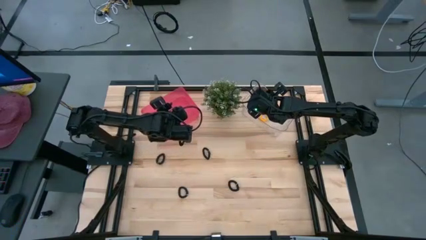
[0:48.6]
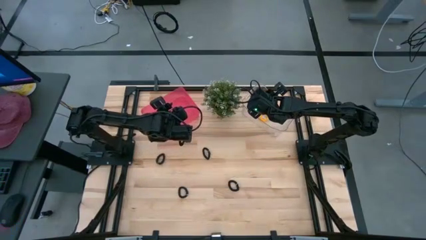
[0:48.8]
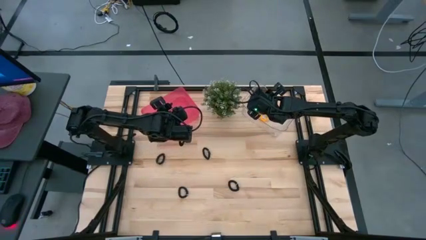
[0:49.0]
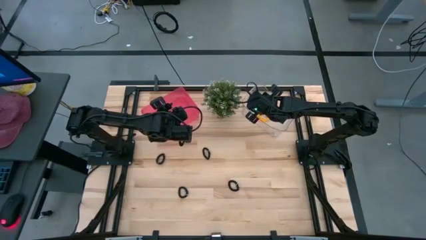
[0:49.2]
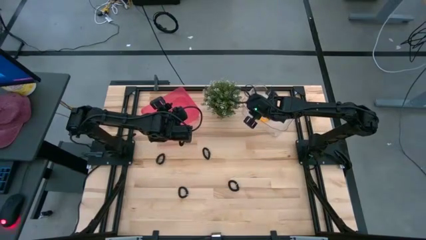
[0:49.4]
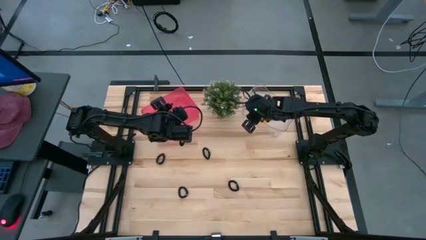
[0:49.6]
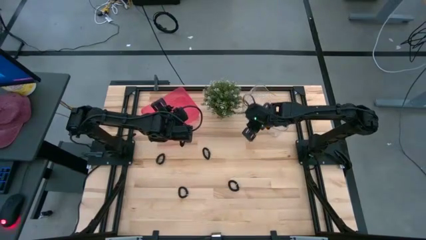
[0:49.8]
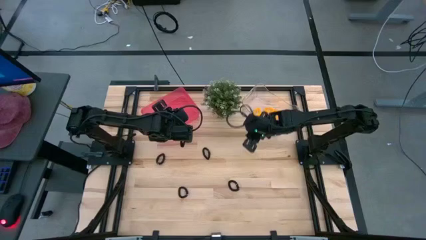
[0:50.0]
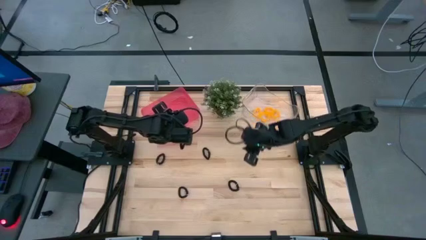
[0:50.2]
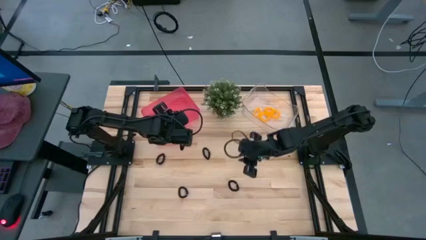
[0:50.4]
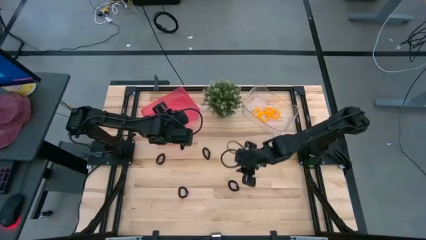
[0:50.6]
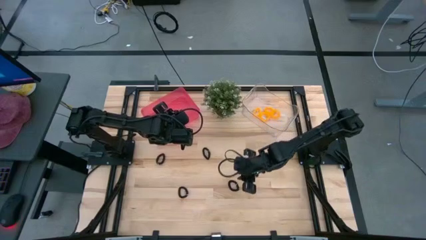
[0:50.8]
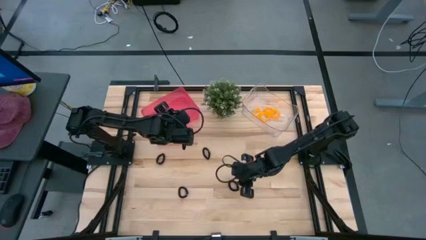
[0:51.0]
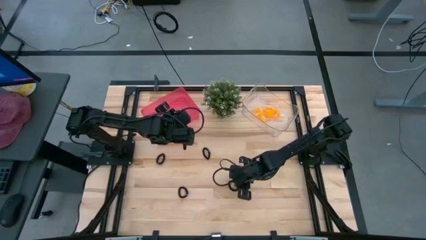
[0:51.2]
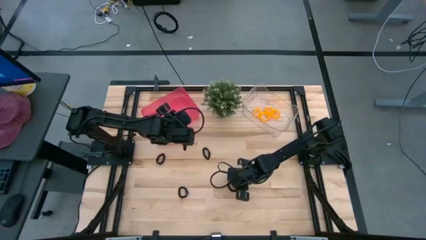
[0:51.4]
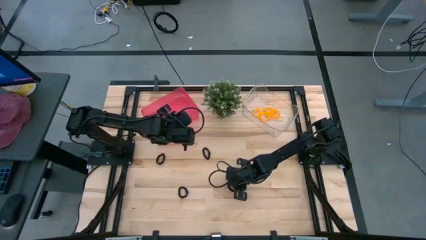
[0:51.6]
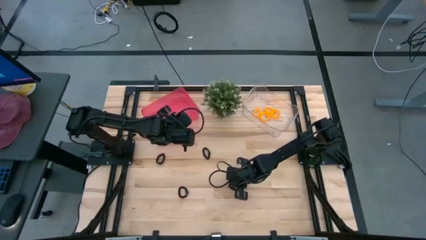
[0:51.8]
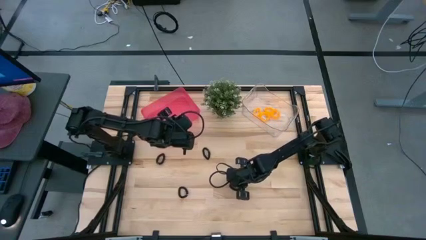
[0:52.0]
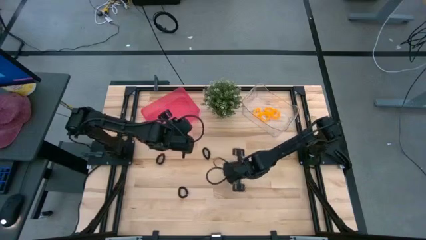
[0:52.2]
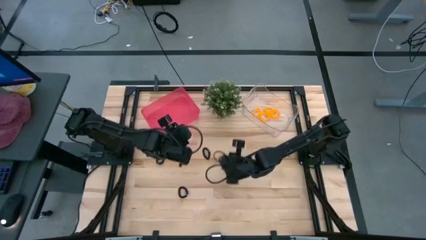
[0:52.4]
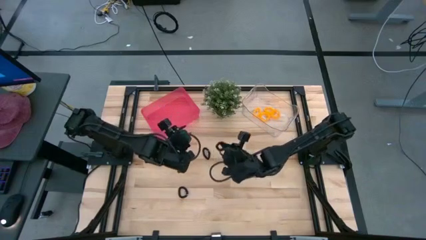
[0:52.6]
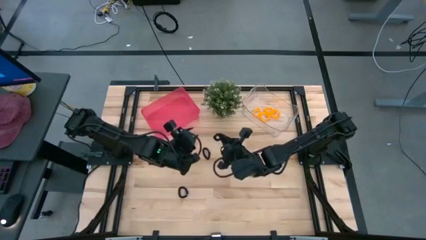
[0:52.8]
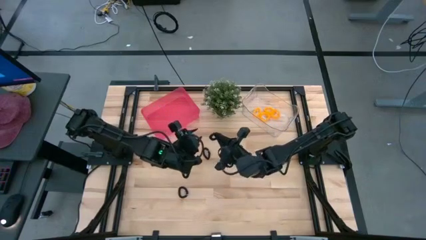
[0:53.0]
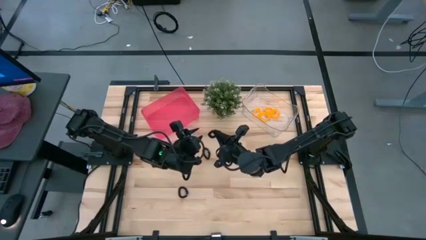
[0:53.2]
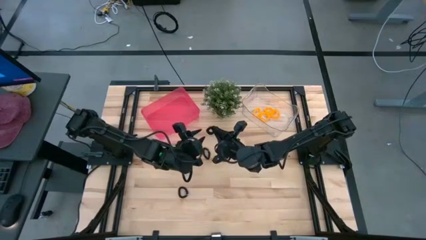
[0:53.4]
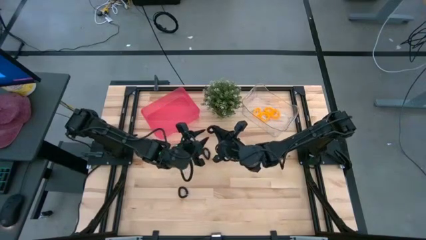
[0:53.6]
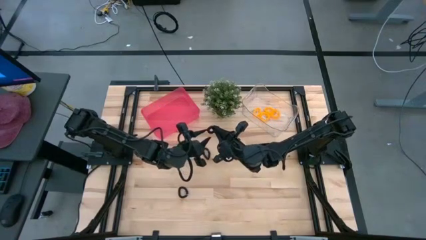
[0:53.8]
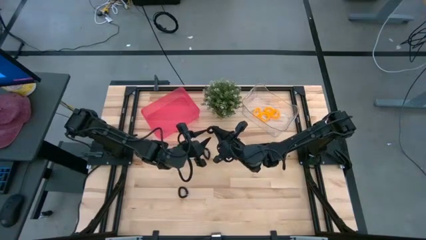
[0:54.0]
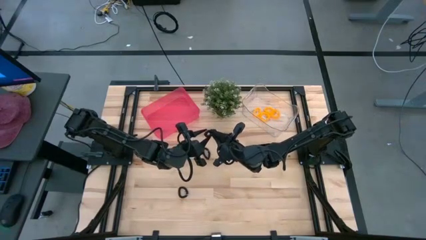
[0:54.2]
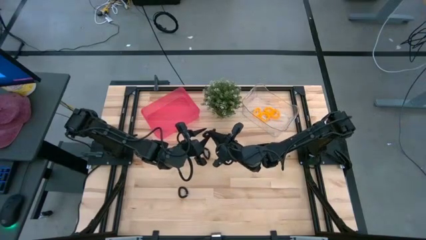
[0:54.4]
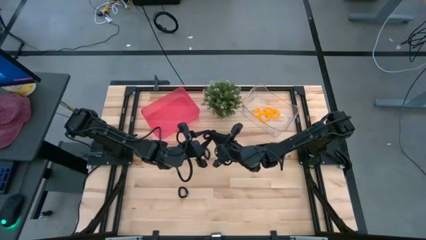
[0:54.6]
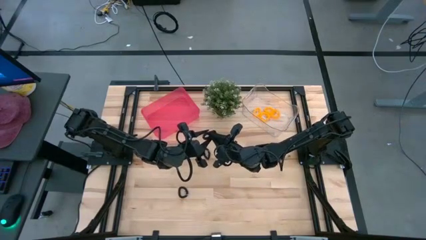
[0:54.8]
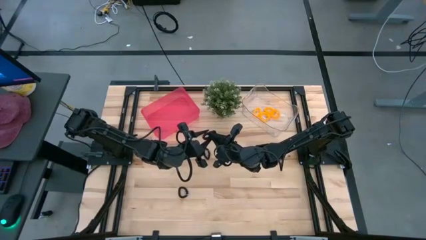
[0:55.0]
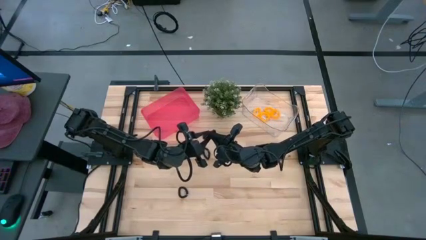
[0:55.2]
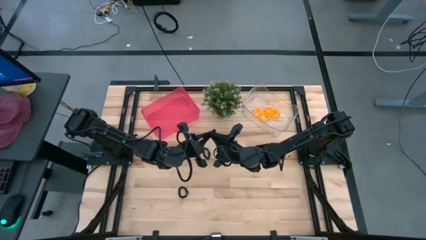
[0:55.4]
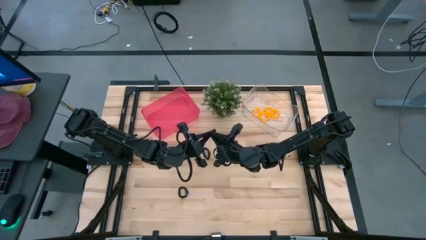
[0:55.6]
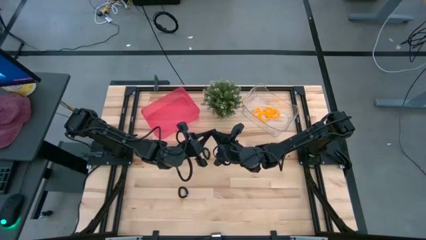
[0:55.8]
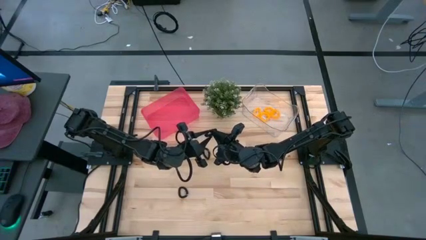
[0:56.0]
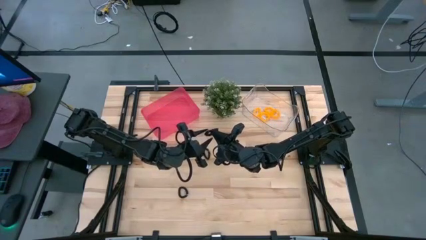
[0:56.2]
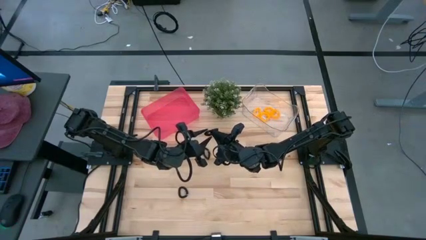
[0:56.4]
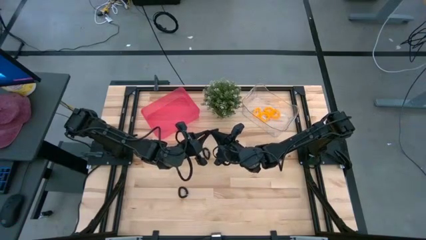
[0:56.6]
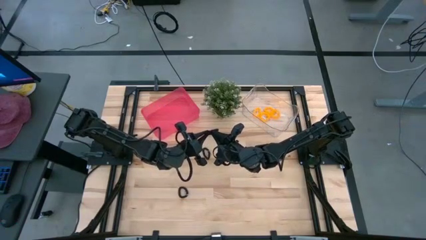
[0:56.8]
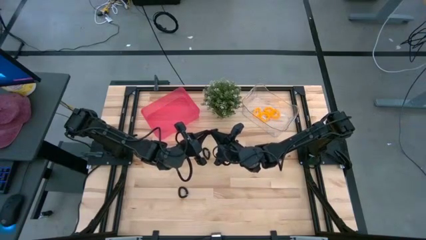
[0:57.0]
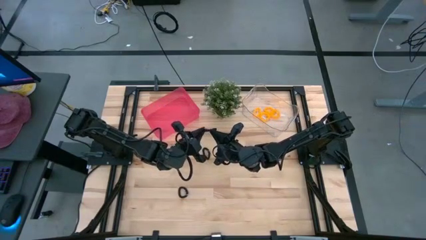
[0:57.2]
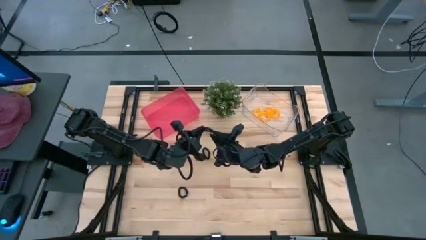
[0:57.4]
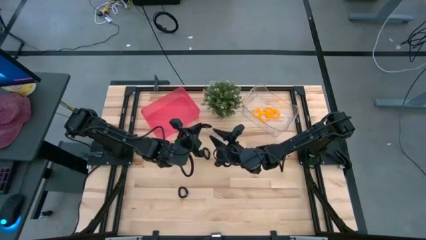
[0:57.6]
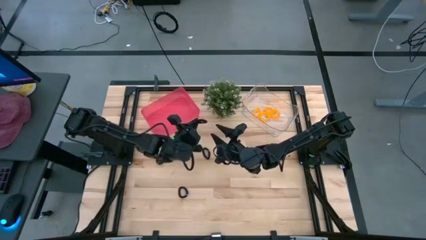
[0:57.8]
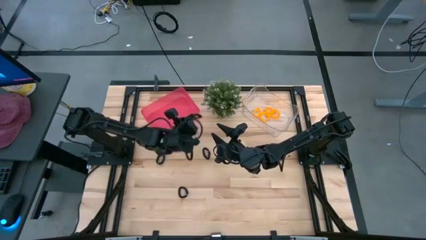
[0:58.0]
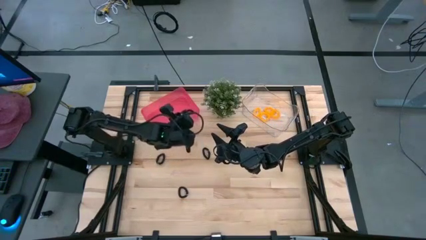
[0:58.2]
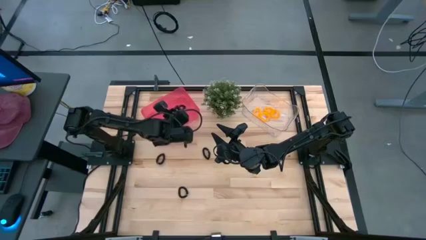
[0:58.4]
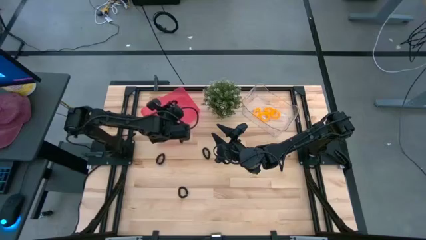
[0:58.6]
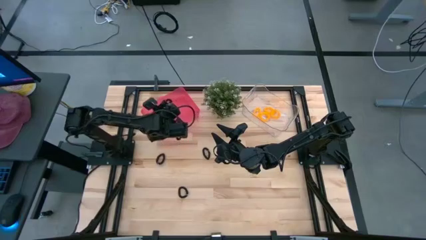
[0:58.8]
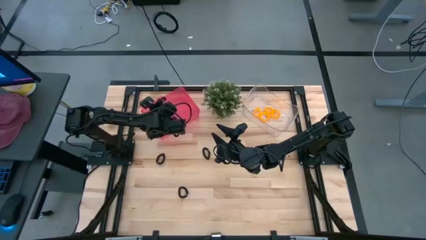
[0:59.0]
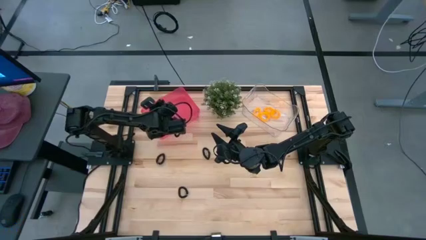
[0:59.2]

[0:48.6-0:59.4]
Task: Sort spring keychains
Put the black spring keychain into the pink bin

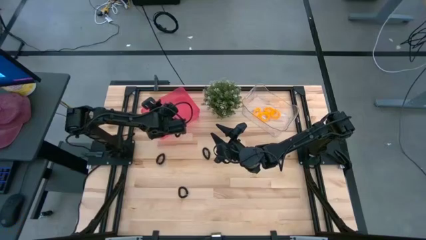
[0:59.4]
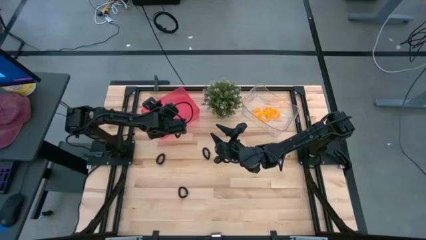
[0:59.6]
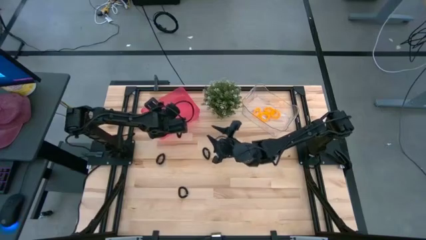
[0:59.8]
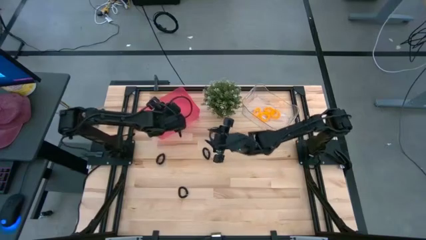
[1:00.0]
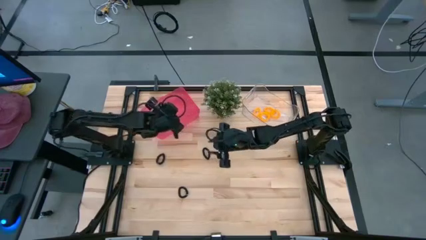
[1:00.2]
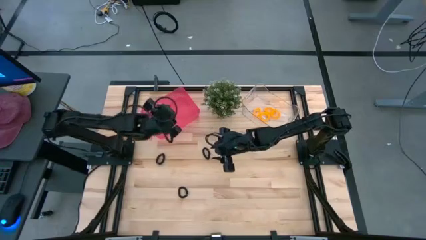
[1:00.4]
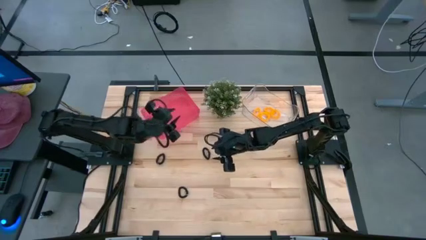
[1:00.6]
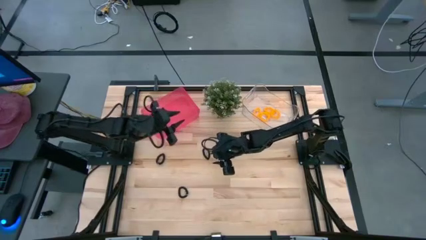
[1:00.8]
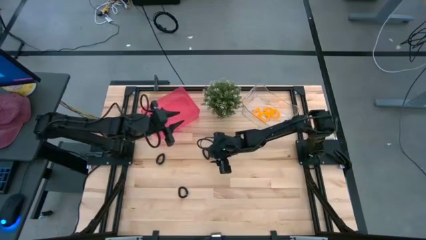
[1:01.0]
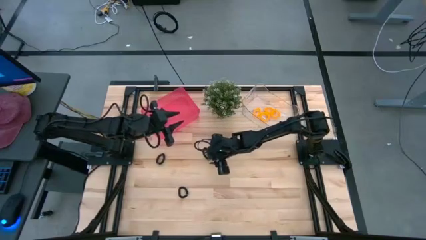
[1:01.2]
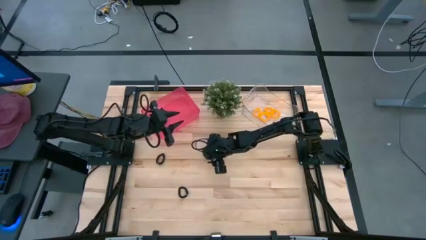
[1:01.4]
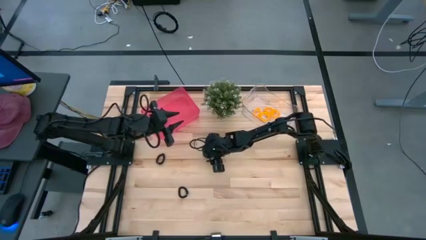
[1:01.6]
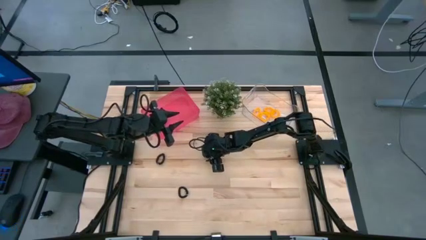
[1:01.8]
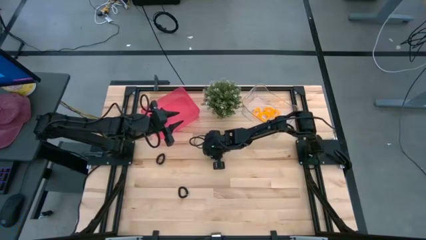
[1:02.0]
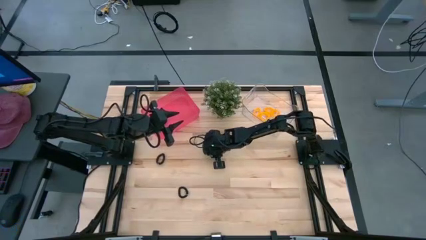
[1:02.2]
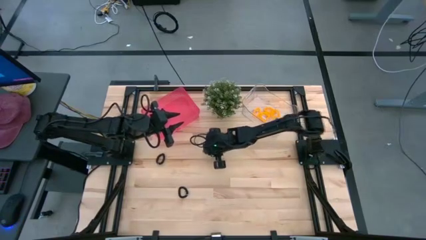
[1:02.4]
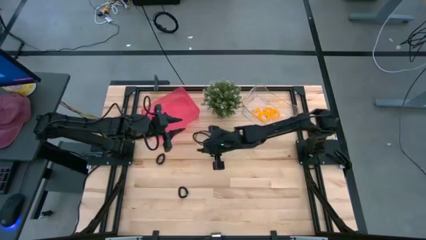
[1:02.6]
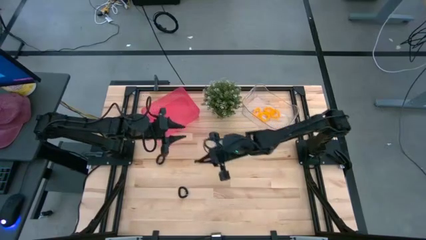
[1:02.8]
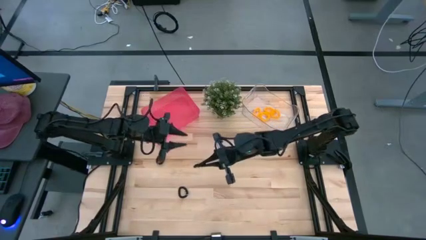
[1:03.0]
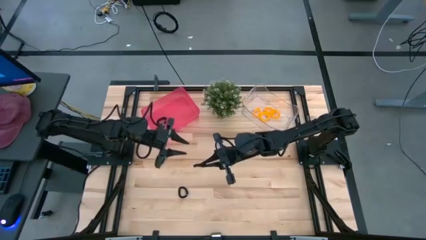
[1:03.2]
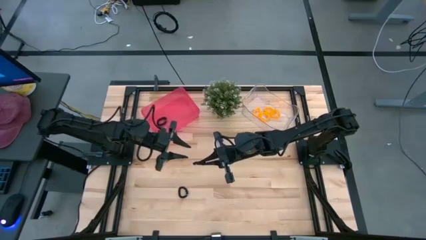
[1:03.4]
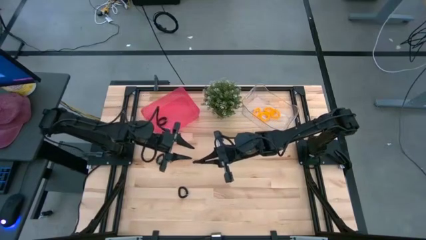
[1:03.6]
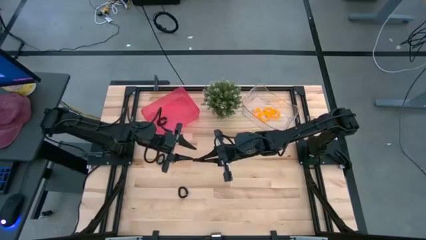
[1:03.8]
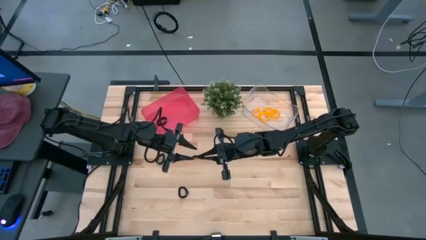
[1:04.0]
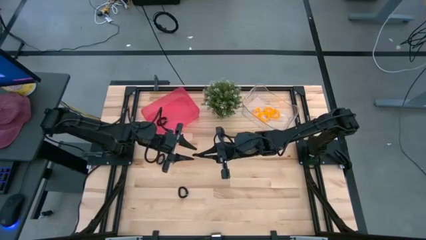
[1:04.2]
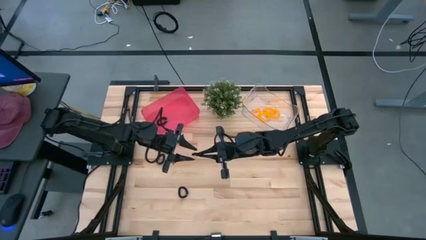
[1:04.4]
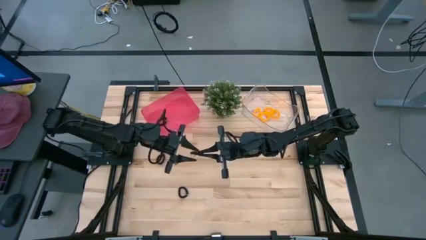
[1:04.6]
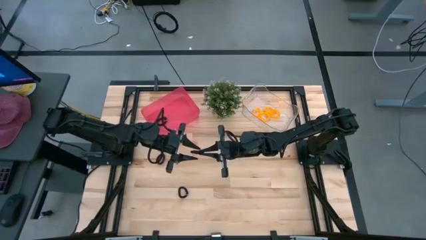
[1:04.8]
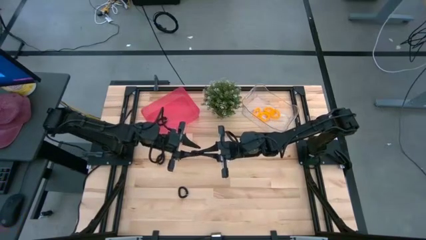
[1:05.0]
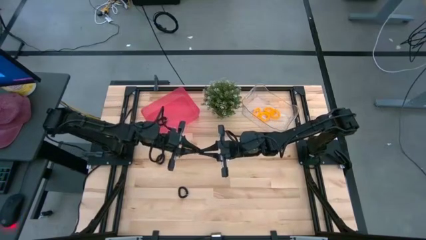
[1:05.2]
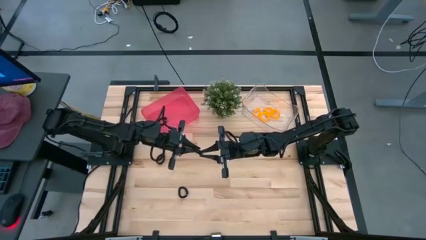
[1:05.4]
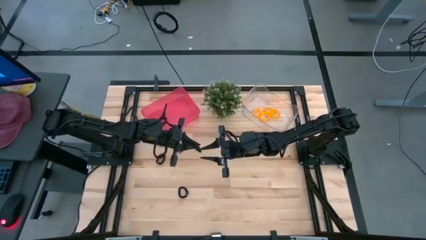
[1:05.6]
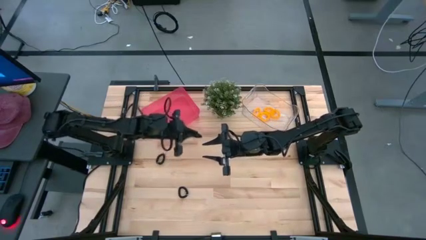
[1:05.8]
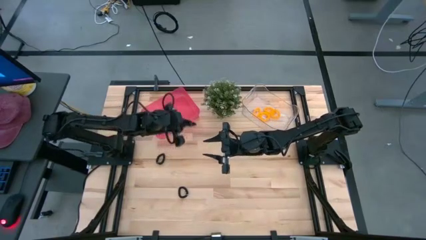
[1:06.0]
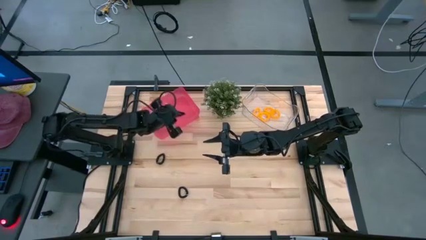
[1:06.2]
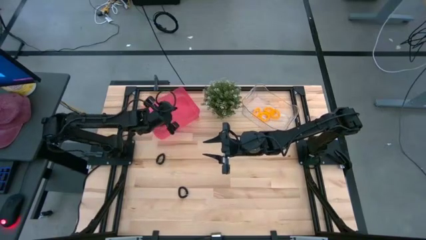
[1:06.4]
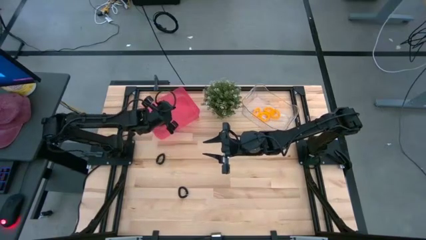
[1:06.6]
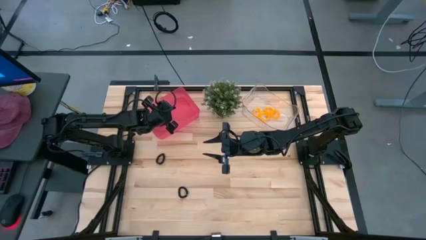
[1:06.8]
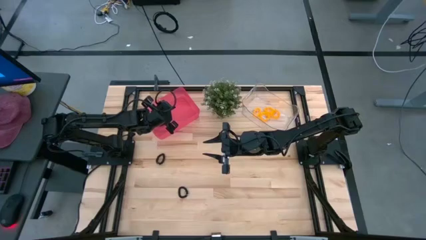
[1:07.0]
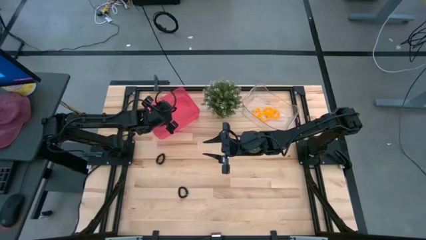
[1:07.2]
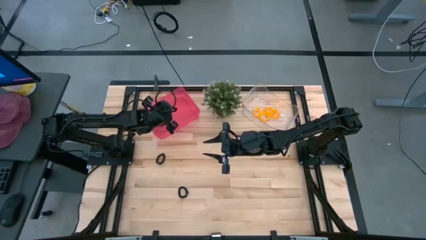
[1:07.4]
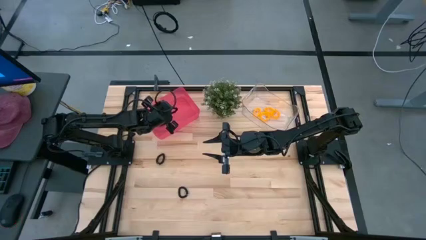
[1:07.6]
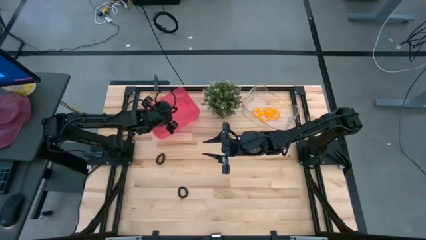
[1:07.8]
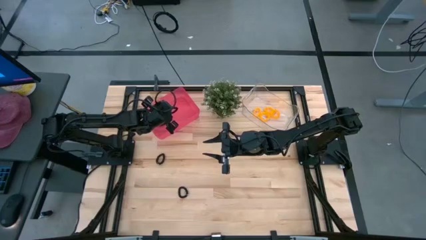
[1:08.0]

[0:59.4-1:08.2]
Put the black spring keychain into the pink bin
